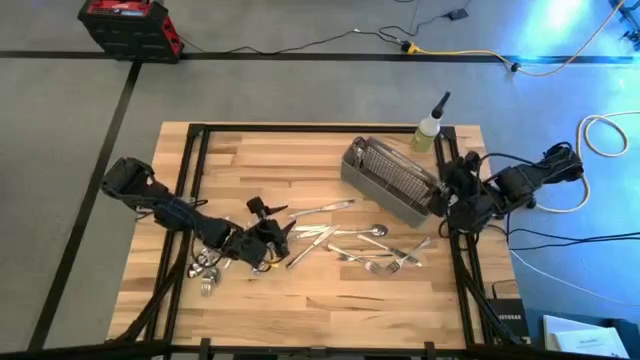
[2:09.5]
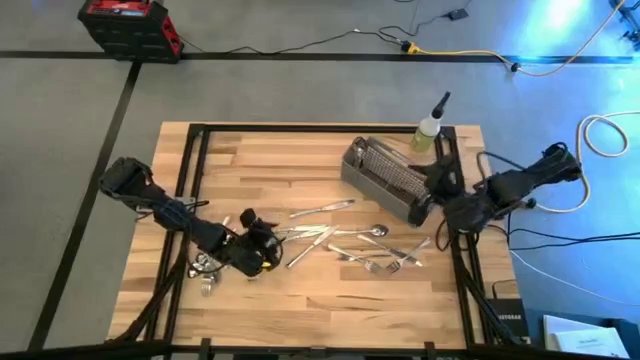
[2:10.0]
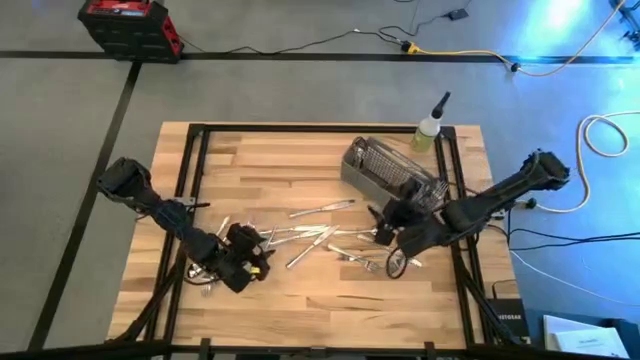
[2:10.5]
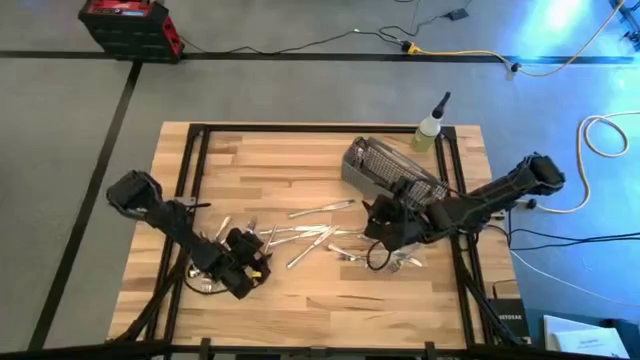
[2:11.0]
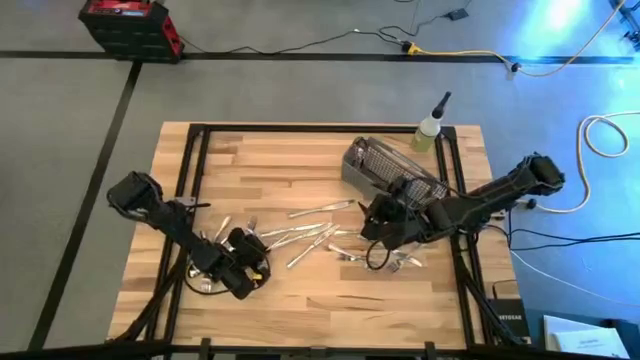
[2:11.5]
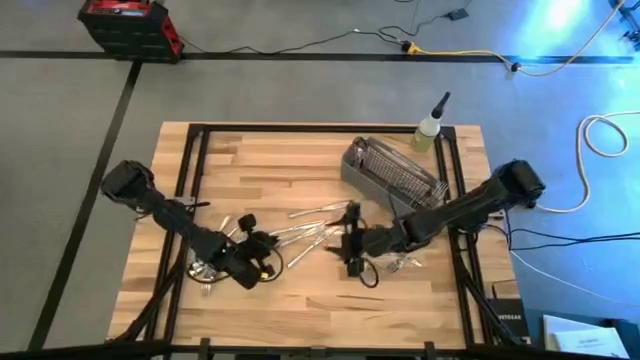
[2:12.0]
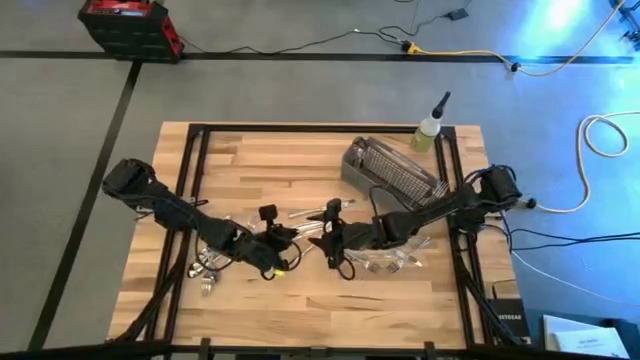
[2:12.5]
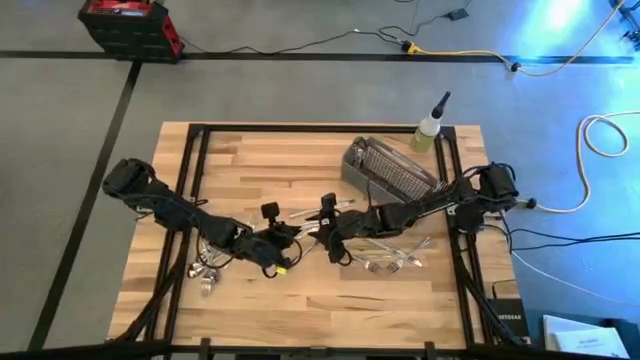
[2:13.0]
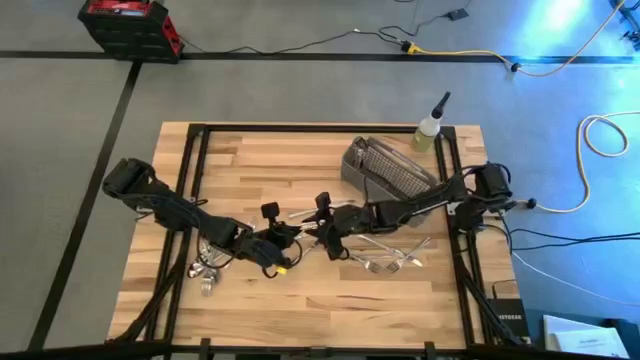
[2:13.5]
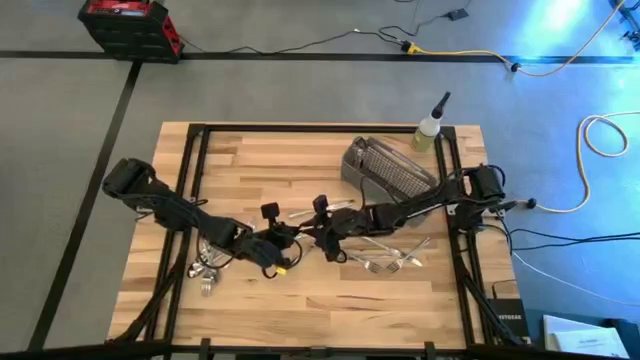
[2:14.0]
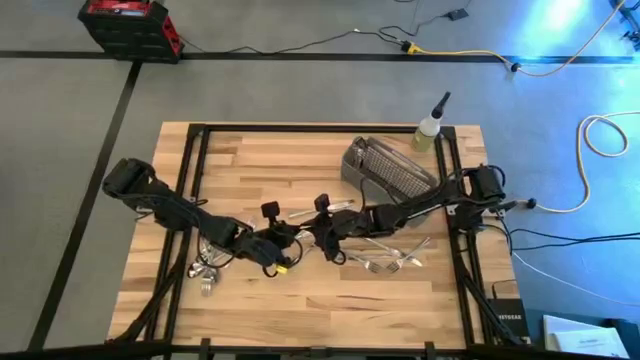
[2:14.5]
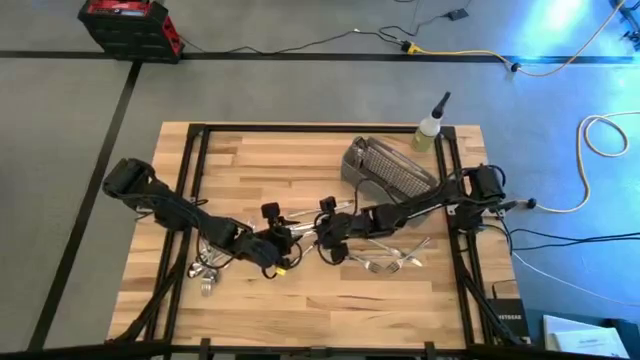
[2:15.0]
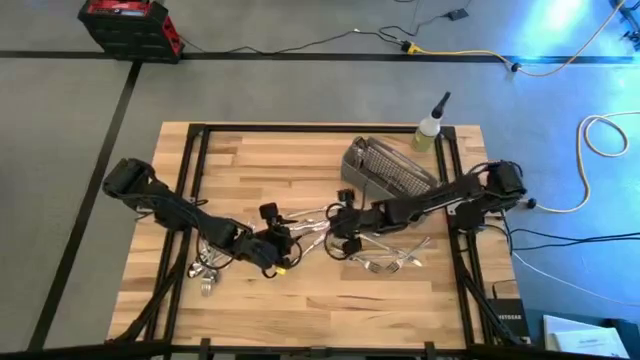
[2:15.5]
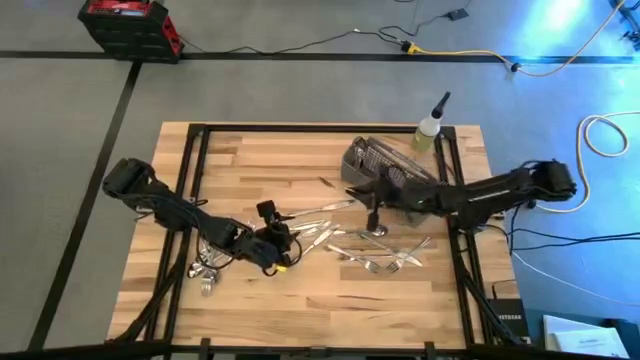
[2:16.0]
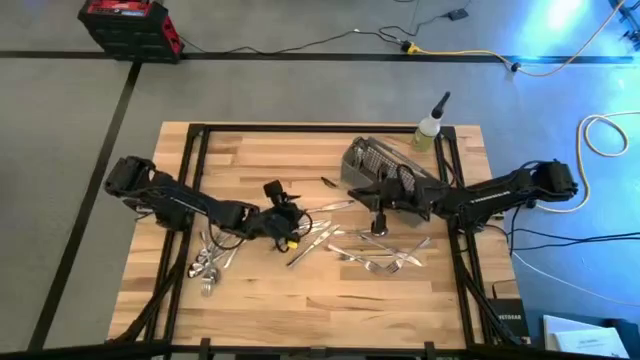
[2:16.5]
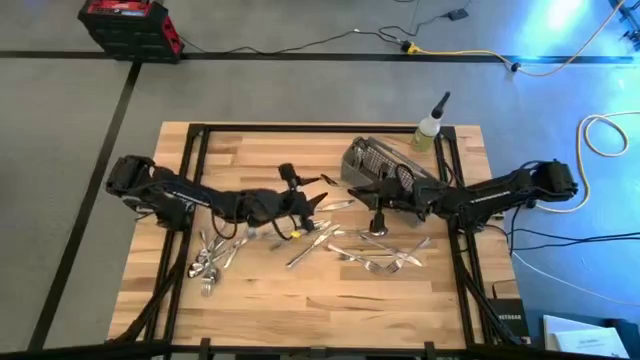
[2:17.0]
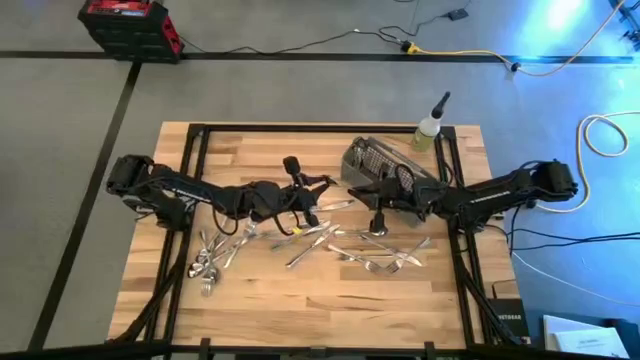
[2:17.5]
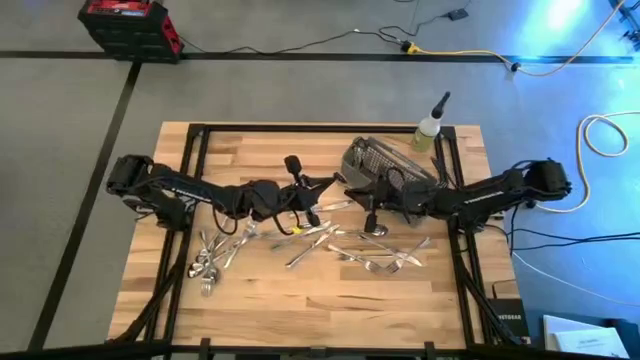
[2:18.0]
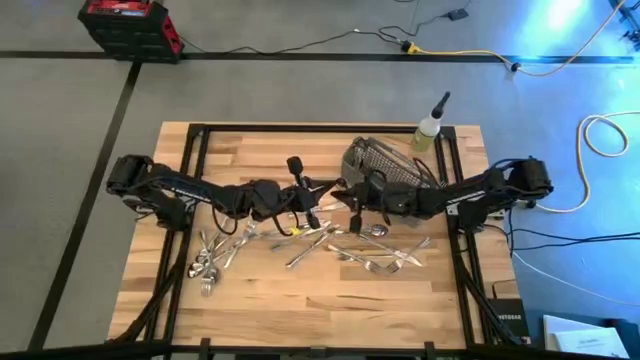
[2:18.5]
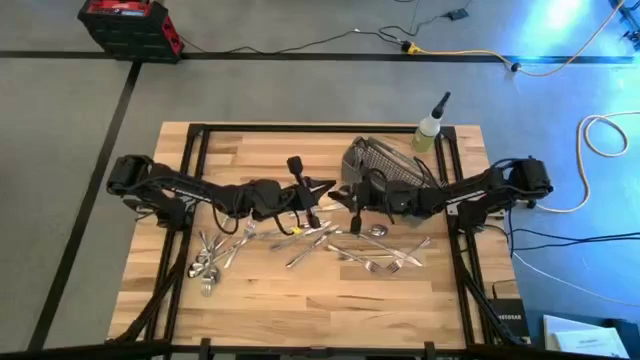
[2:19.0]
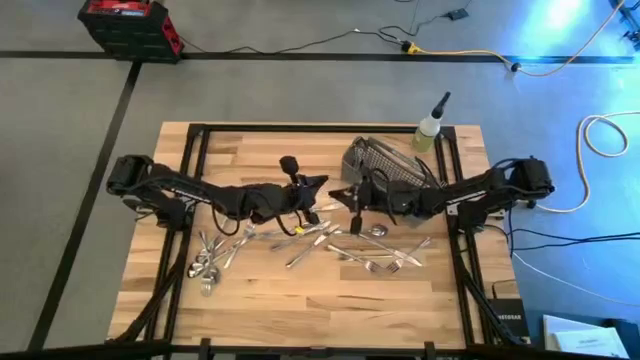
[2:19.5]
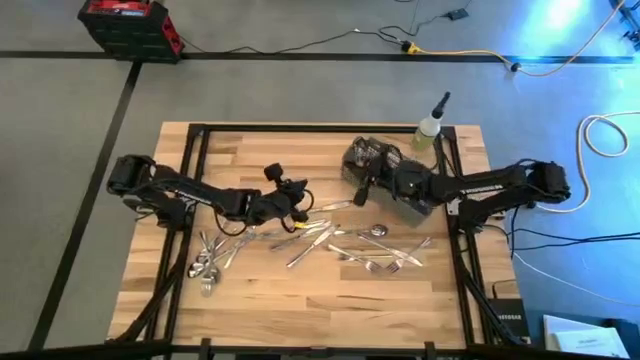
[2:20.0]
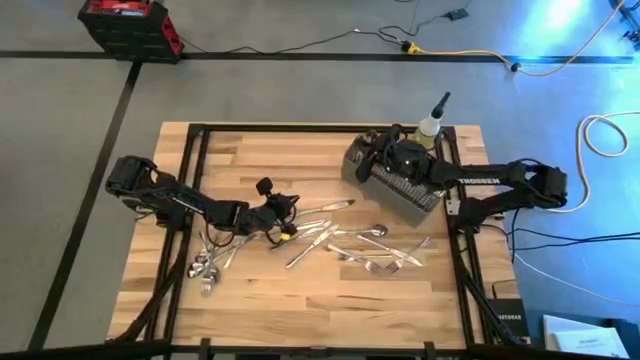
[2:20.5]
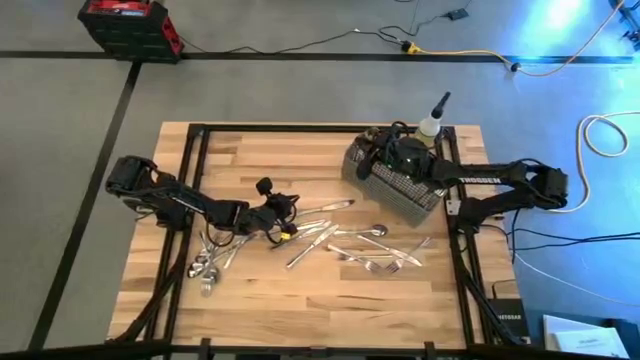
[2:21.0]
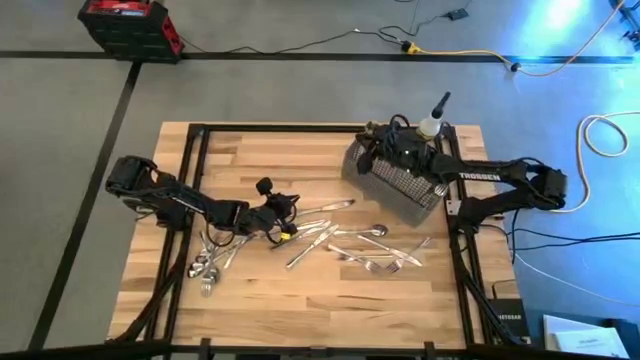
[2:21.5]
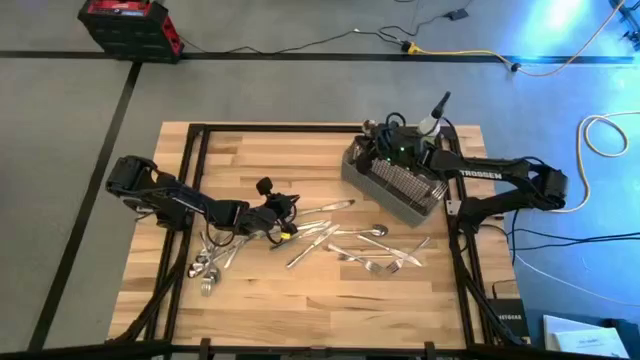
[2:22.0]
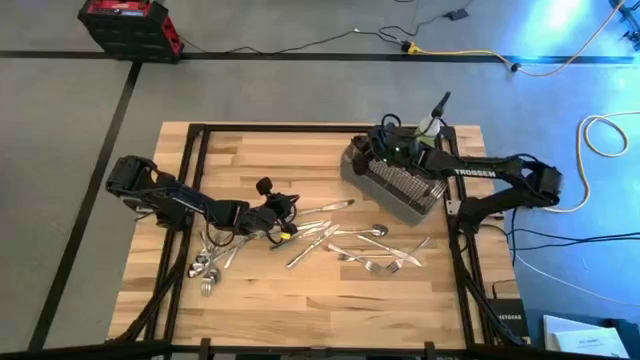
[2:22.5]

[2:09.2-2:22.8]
Task: Sort silverware
Put the silver spoon into the gray silverware organizer

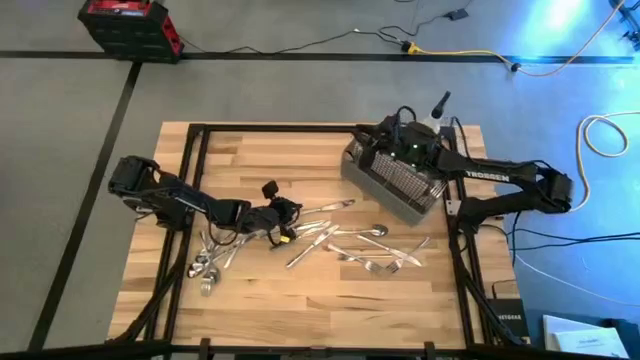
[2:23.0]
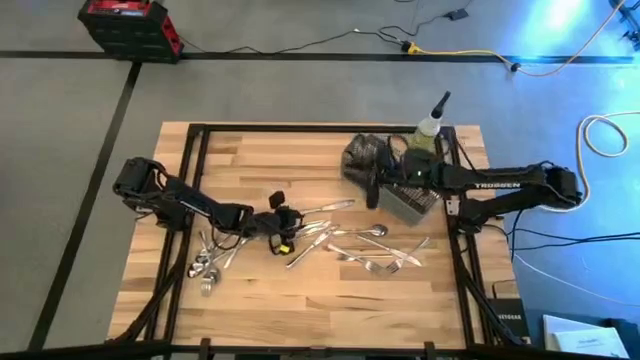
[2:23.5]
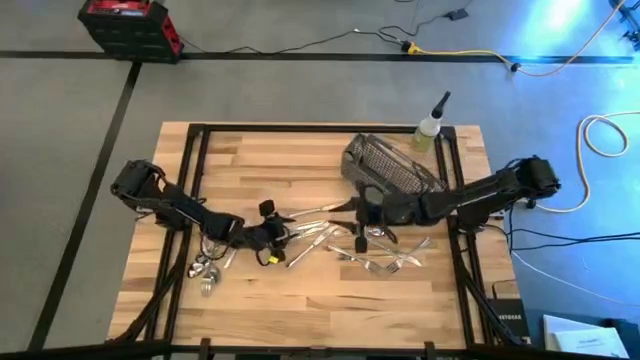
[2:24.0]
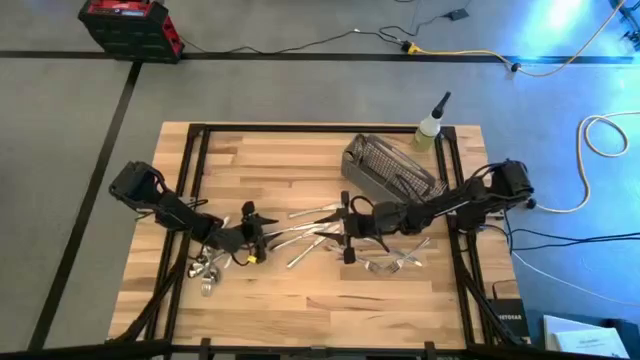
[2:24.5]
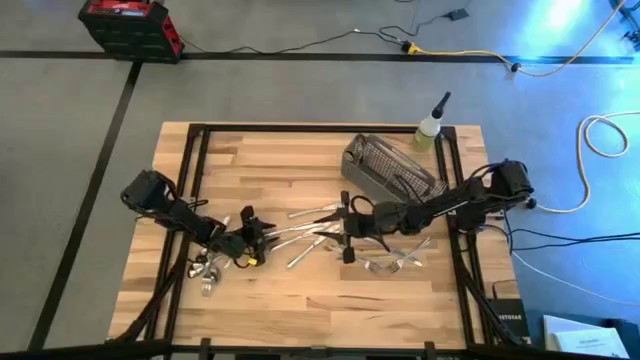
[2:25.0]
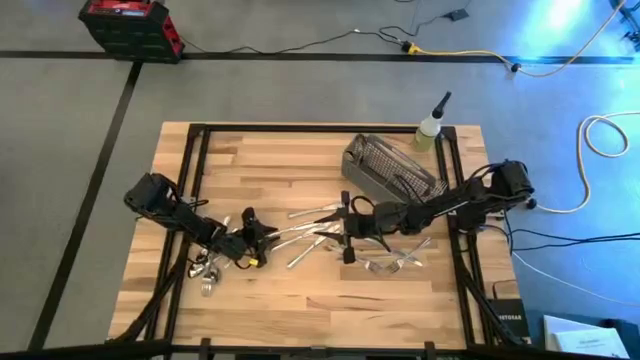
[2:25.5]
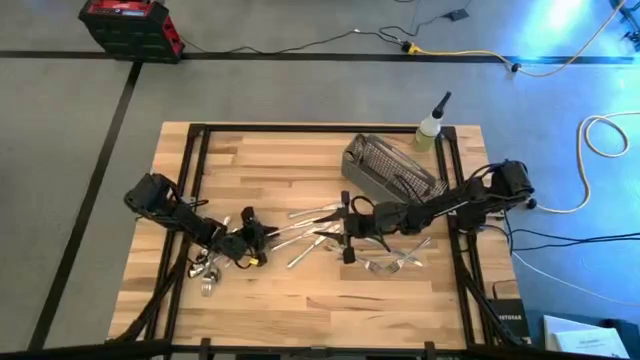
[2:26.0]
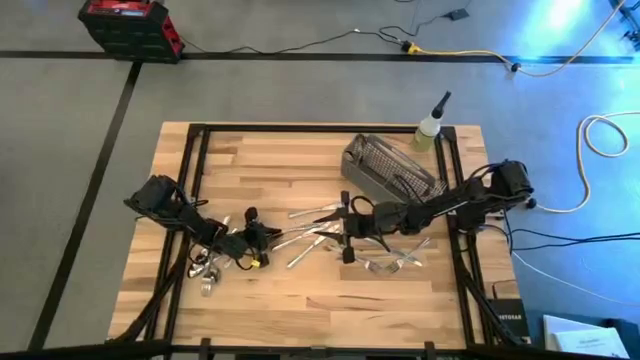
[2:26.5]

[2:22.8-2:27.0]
Put the silver knife into the gray silverware organizer

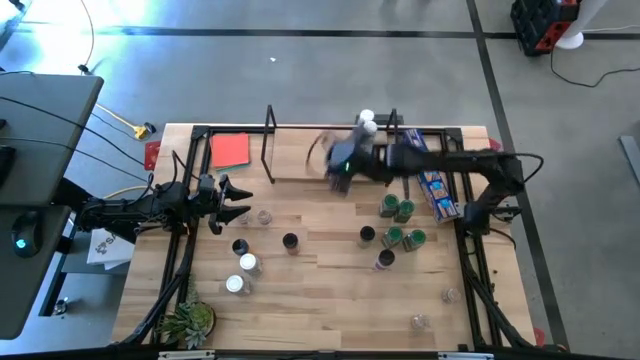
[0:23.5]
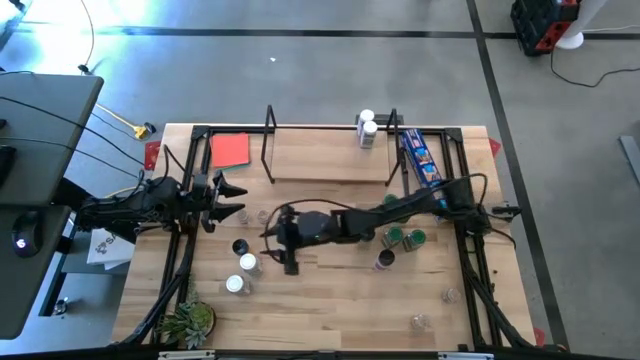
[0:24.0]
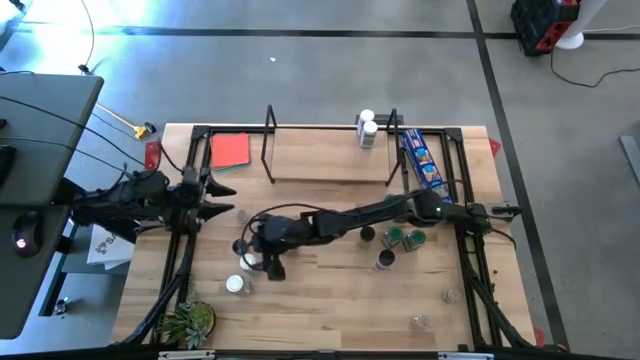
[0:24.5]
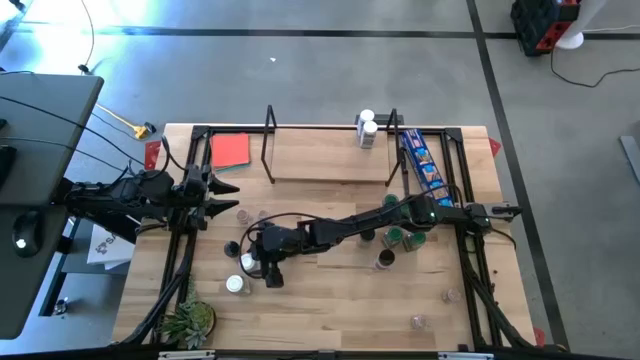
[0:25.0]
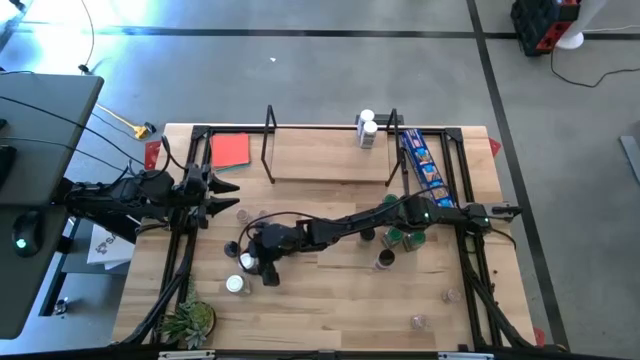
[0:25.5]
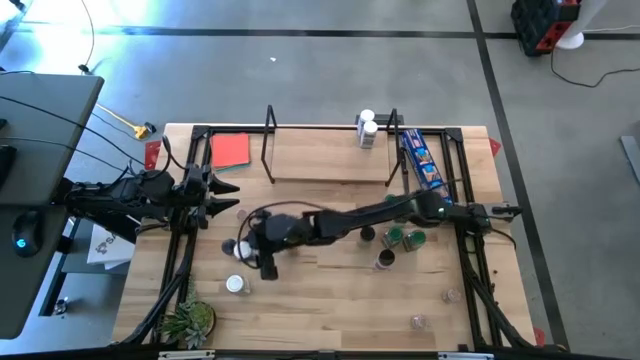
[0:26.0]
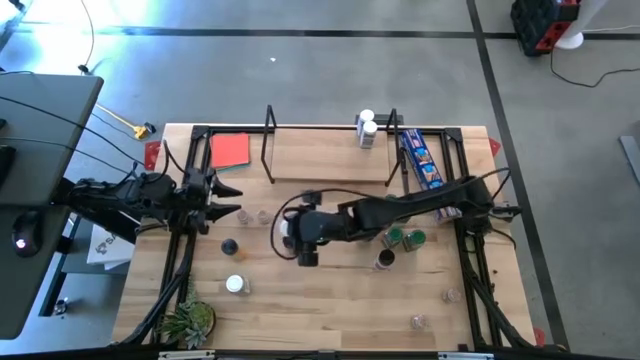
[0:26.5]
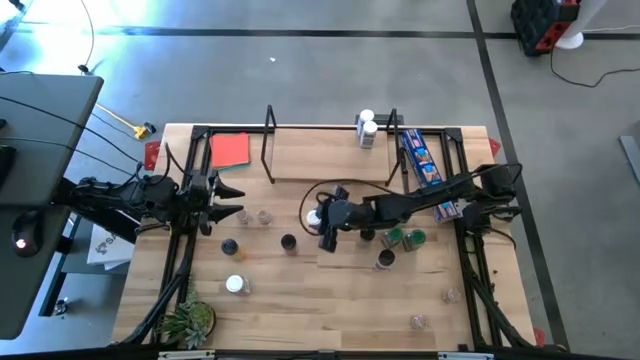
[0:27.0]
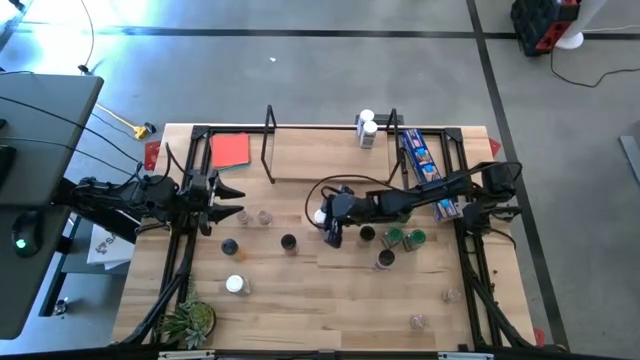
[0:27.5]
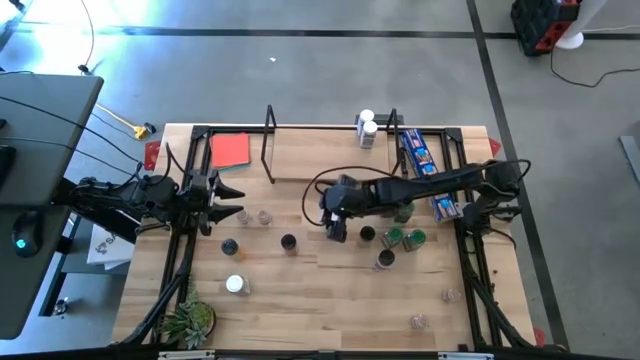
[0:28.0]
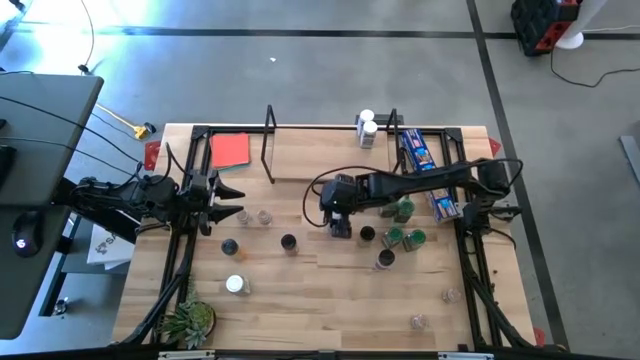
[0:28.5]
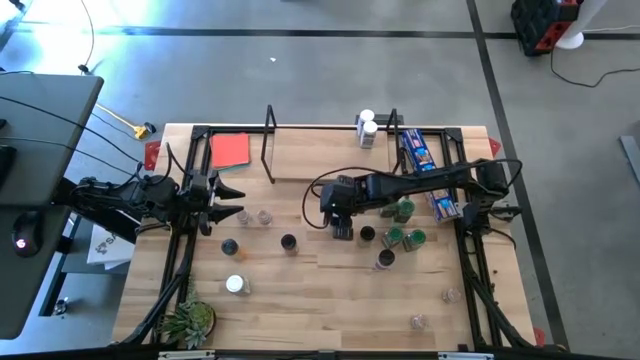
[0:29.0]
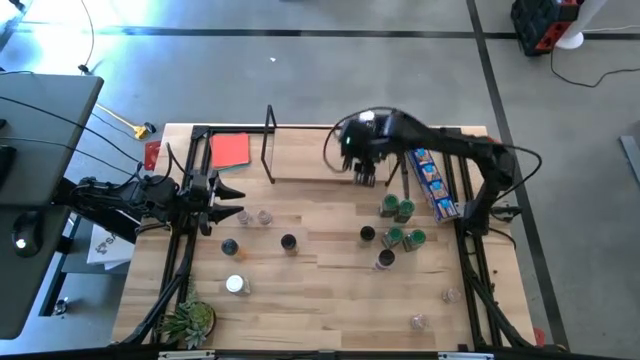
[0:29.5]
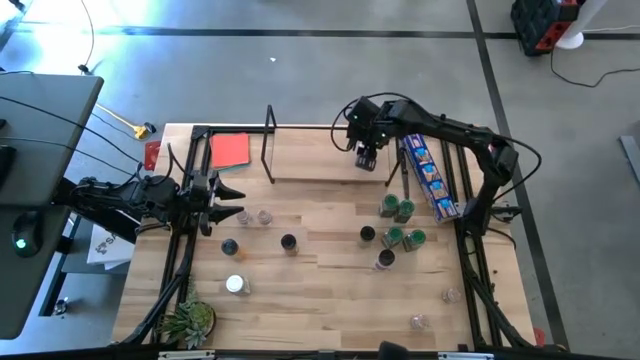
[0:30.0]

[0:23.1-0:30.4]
Task: Shelf spices
Put the top white seasoning bottle on the shelf aligned with the other white seasoning bottles
